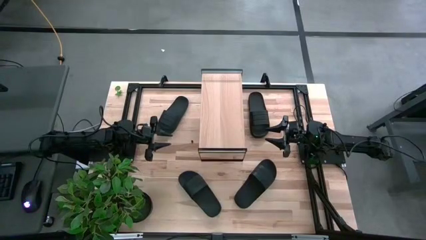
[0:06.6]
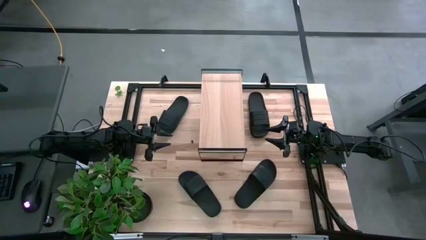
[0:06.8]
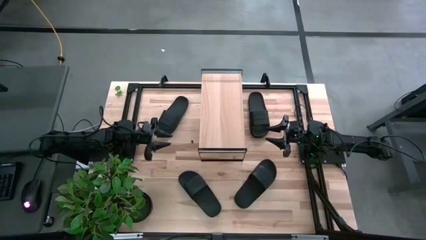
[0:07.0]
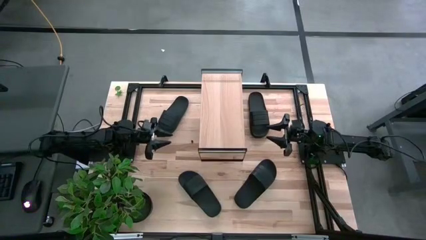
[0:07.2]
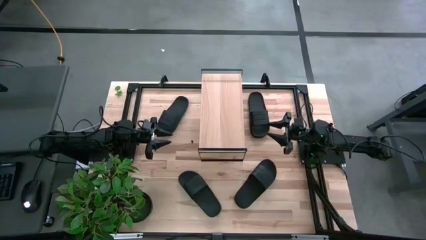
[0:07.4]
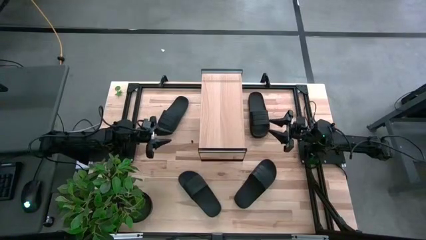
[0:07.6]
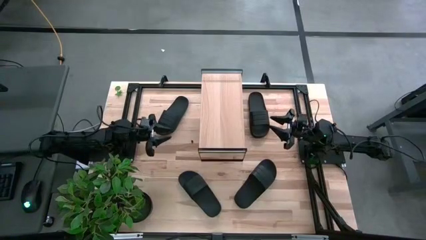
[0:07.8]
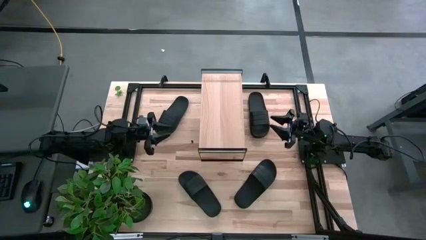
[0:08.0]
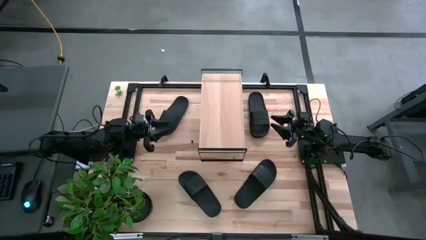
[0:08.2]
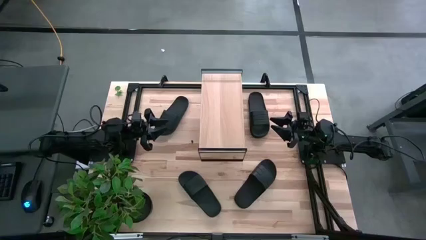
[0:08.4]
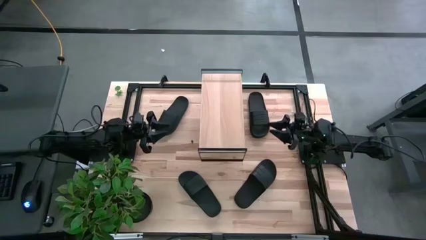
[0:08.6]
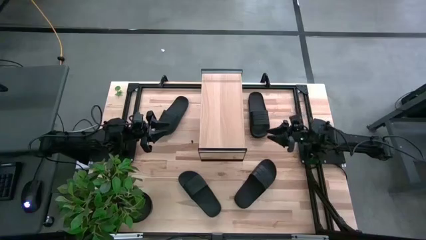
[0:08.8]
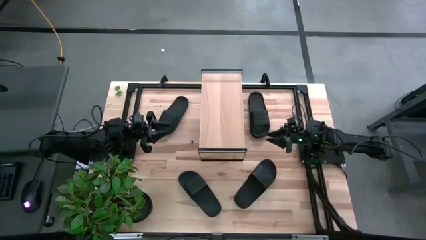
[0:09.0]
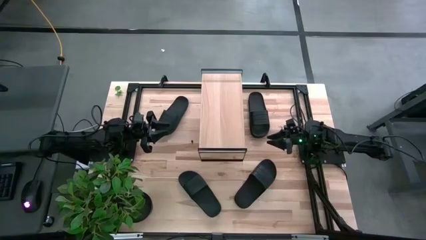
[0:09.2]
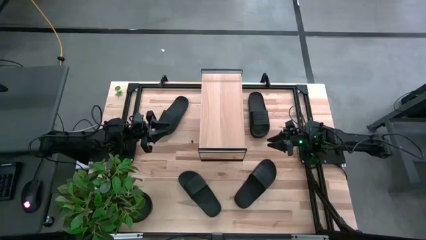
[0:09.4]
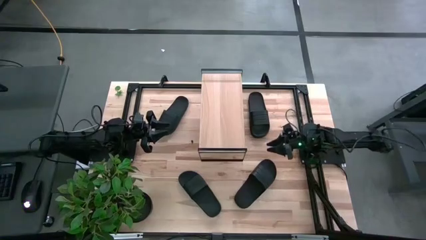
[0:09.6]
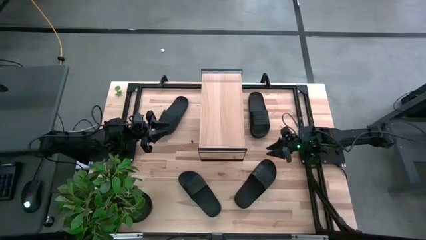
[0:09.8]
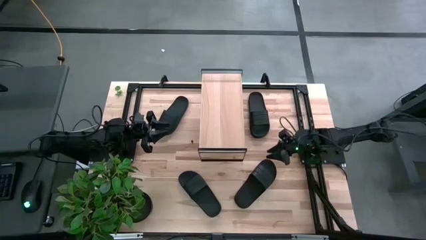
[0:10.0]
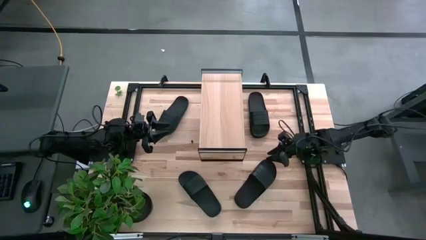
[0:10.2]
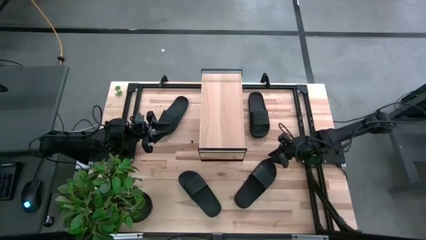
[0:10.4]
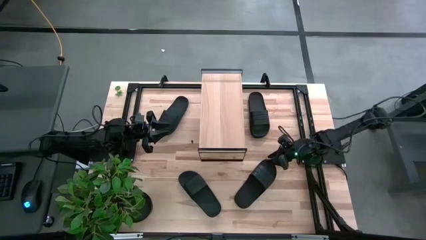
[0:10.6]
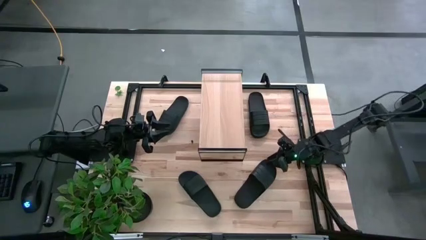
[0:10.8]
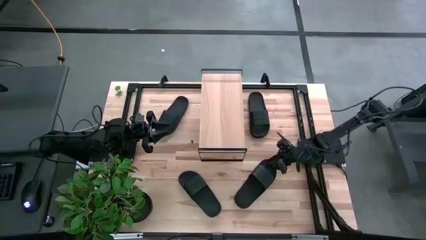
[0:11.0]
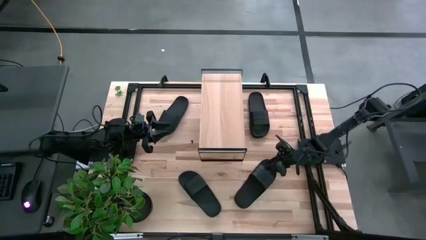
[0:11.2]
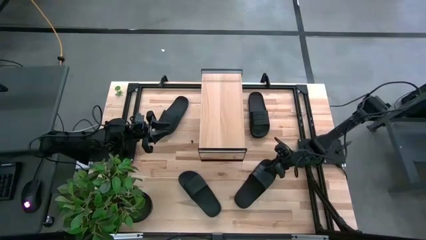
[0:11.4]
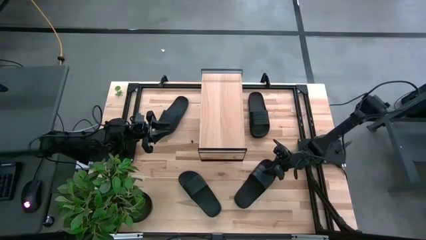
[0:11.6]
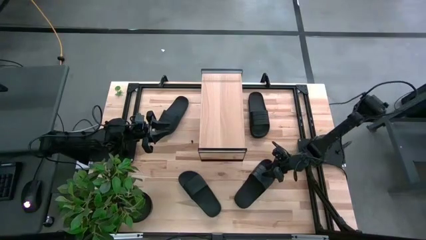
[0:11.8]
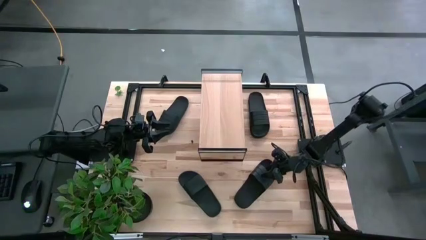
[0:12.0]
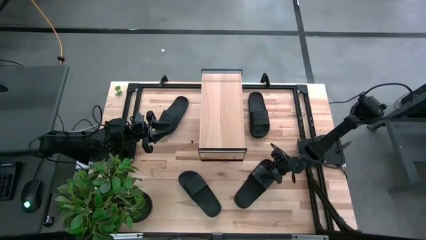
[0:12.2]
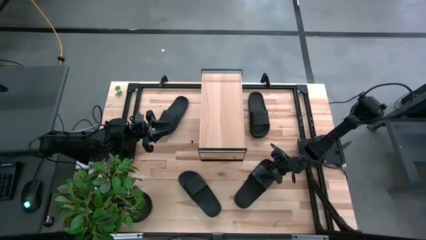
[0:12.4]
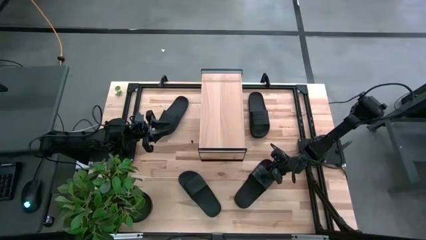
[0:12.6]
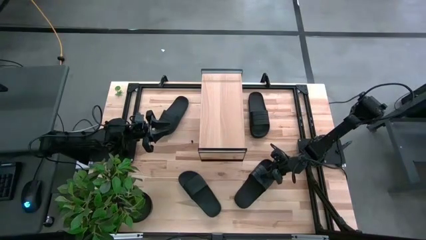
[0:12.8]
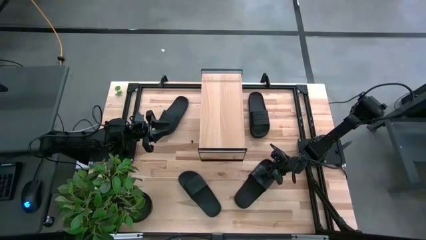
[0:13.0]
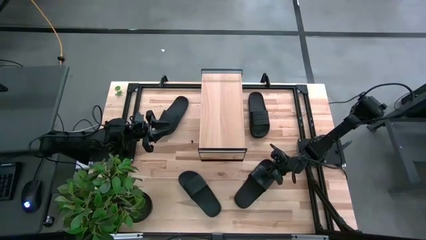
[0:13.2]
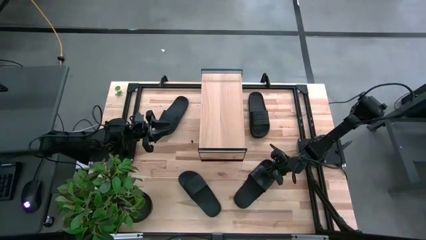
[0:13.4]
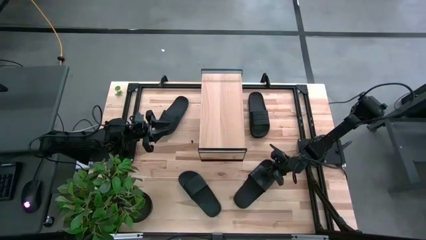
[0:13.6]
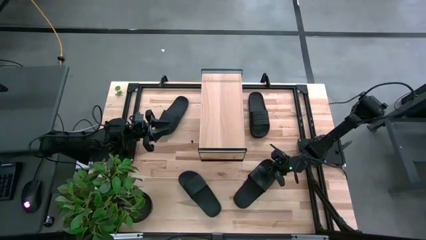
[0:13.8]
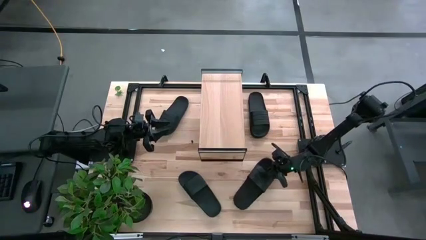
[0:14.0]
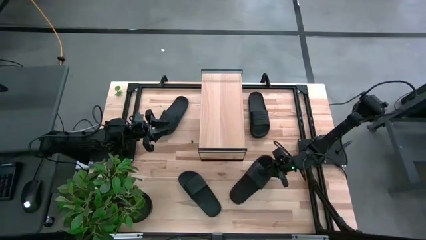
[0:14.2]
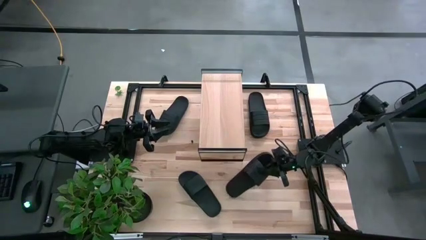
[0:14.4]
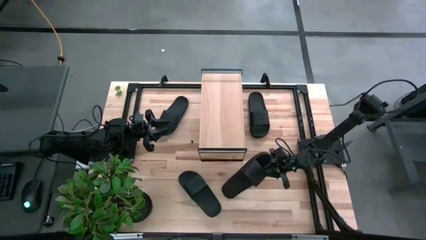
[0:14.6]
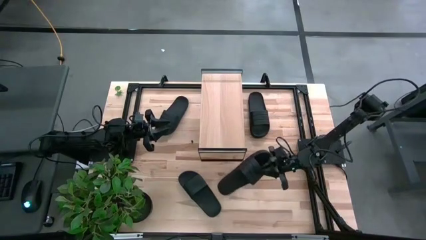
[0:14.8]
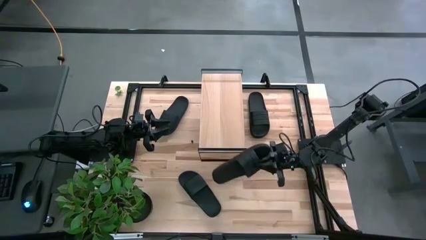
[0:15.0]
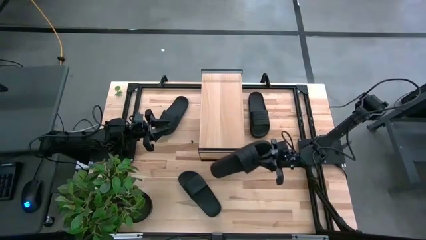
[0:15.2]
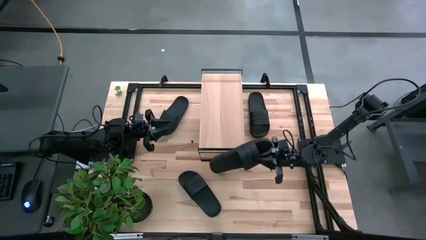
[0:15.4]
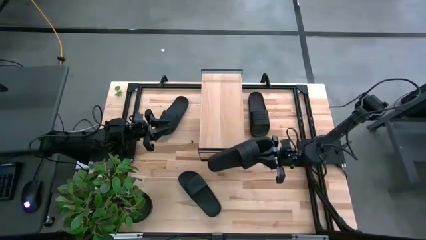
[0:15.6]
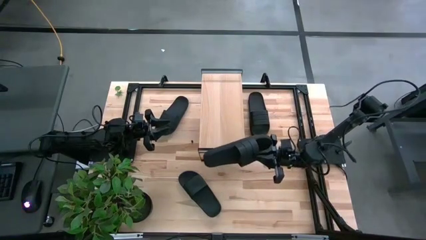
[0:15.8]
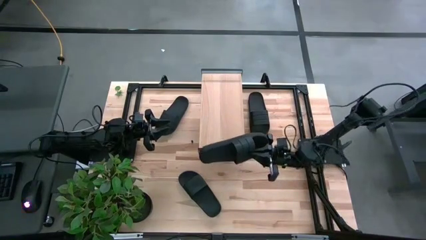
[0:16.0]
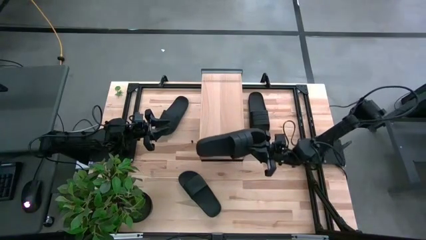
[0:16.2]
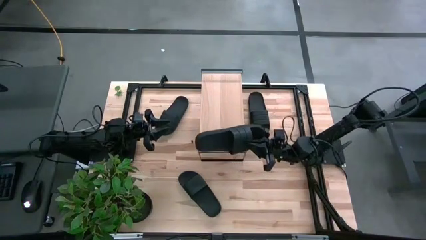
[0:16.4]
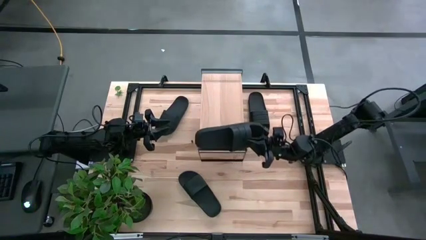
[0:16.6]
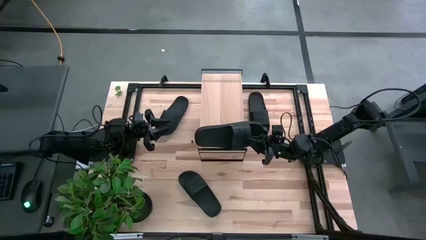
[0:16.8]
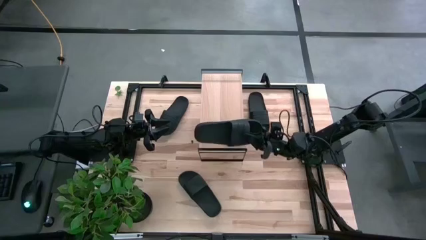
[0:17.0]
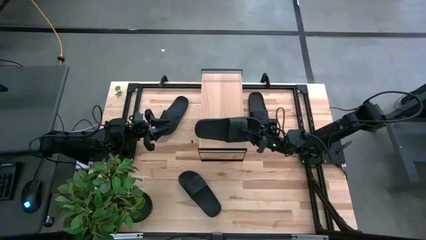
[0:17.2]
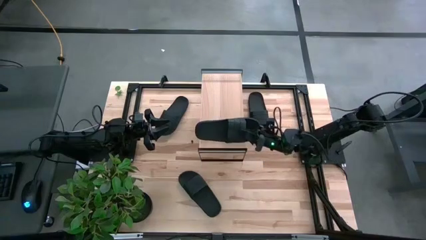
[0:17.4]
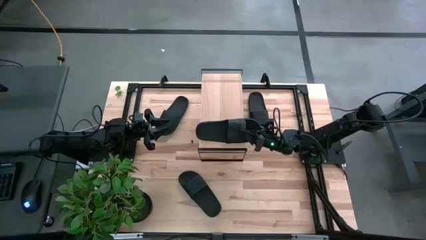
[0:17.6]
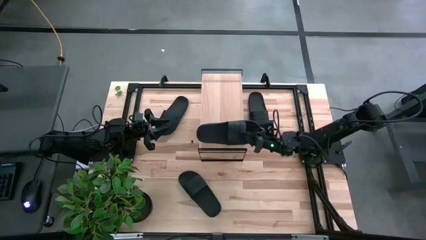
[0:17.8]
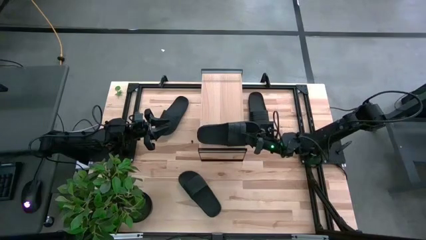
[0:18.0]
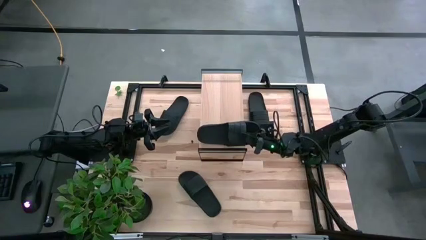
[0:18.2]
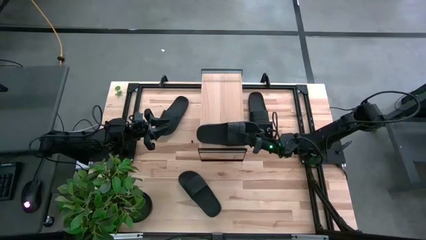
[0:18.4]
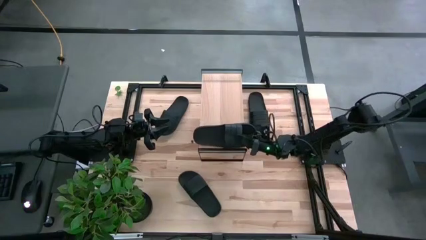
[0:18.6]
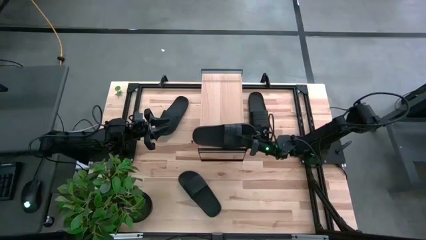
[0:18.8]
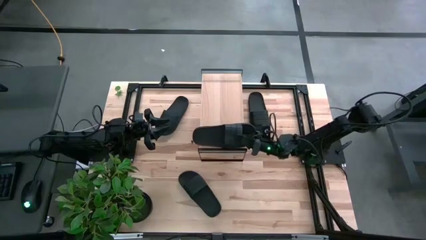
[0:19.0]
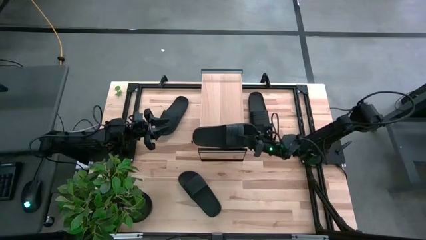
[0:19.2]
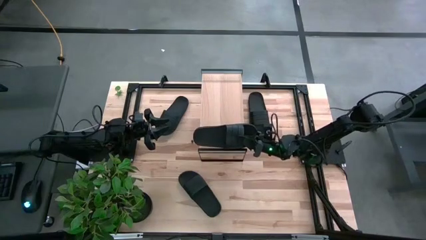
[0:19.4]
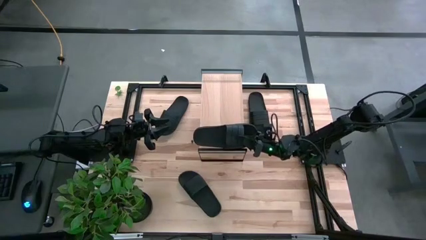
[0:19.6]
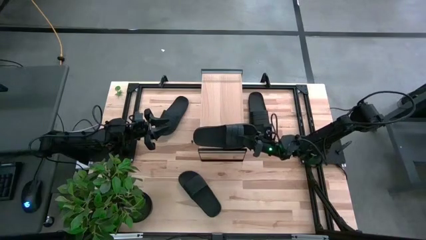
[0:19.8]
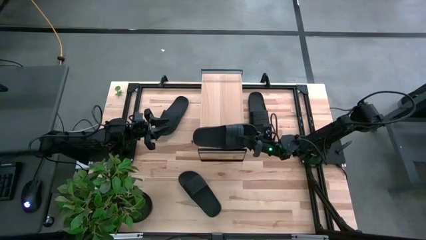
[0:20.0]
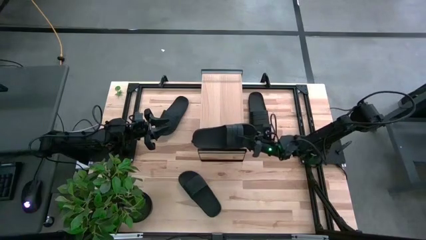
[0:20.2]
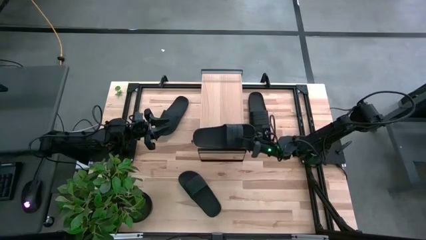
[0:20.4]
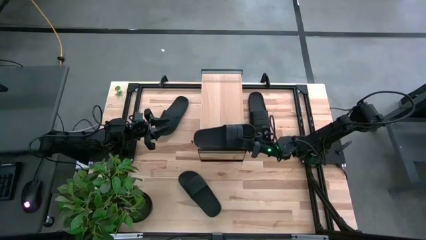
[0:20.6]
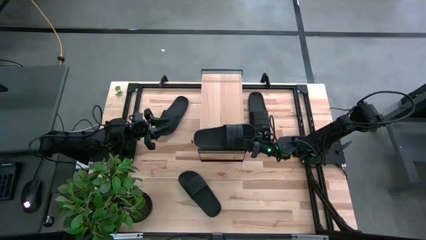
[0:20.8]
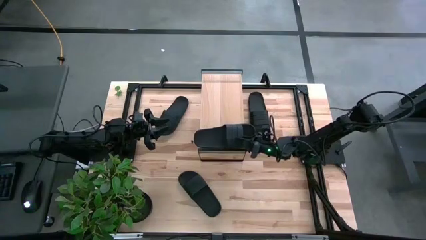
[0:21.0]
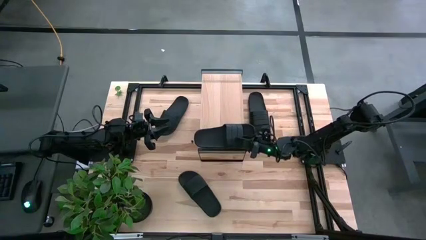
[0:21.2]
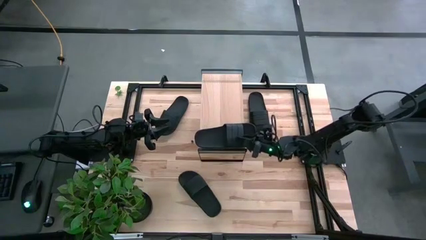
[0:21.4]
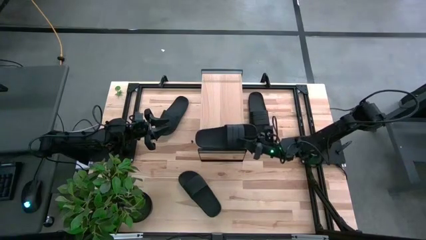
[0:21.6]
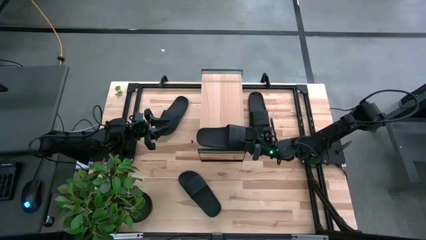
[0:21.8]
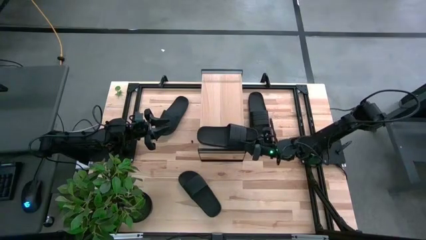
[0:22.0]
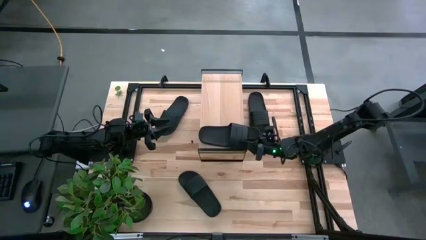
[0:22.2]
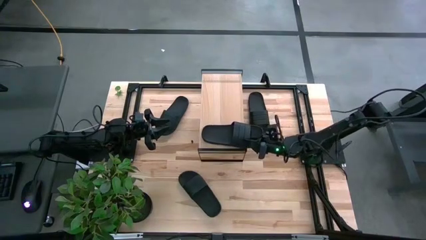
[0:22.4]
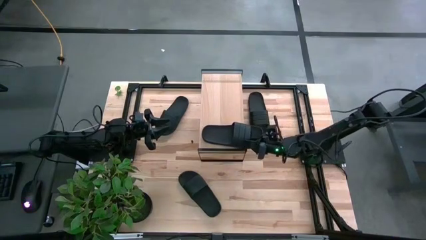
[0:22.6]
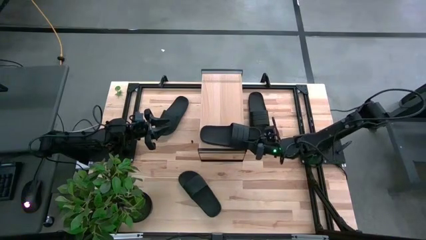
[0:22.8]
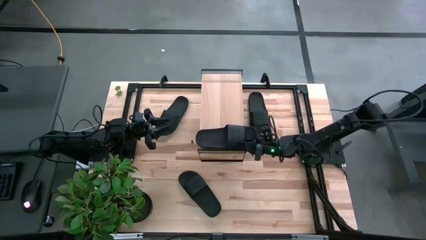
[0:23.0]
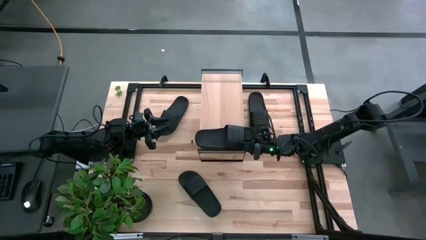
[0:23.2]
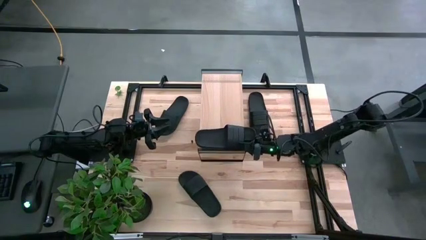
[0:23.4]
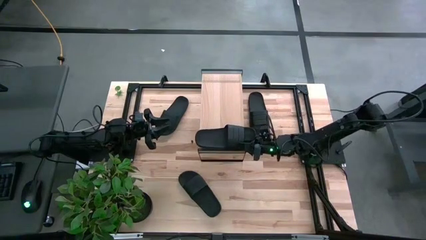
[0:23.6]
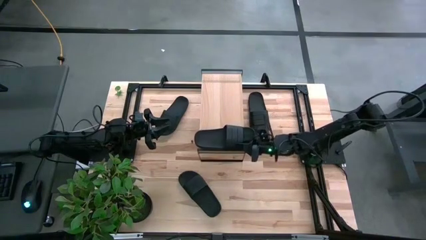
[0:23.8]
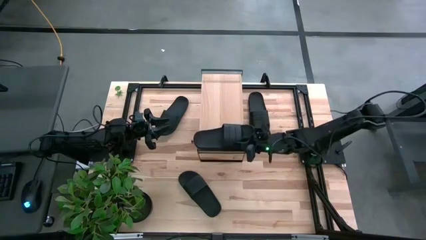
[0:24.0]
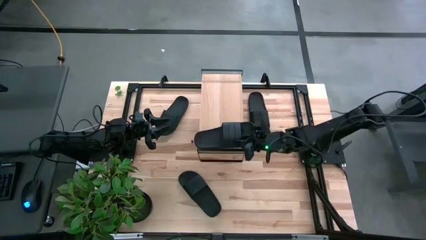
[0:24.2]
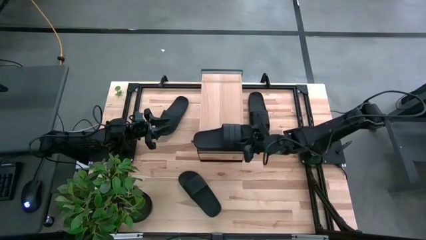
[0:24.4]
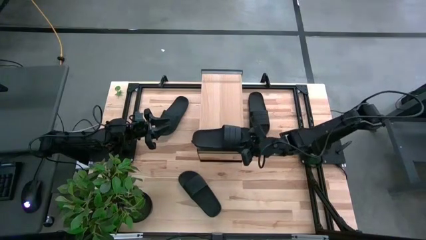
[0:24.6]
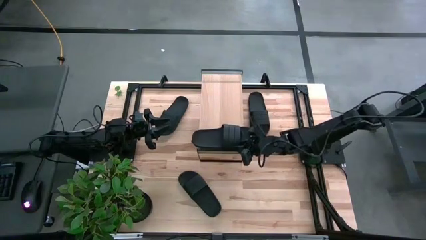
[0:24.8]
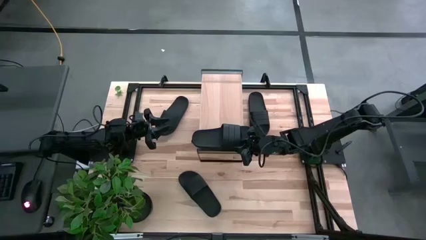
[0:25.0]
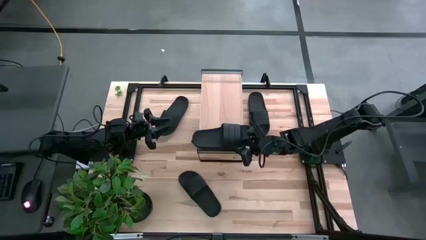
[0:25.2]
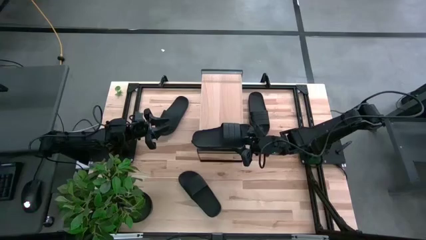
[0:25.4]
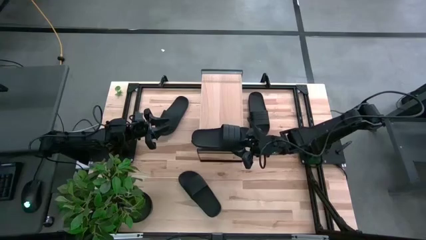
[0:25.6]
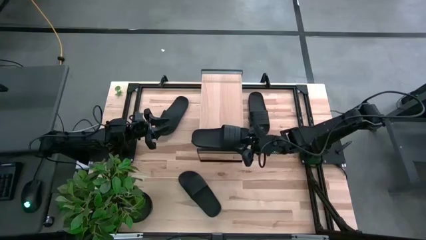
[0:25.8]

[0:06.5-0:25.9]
Task: Pick and place slides into the shelf
Put the black slipper on the shelf
